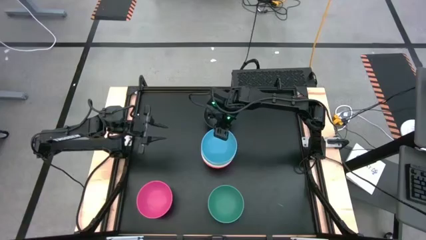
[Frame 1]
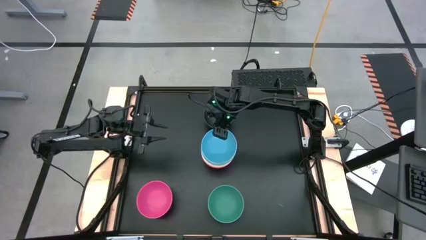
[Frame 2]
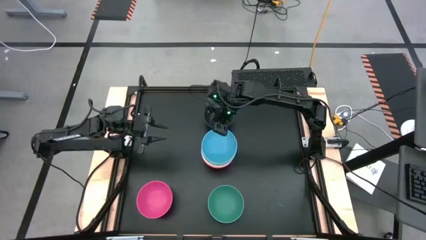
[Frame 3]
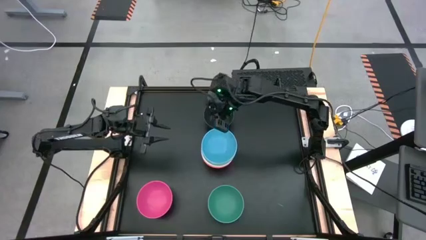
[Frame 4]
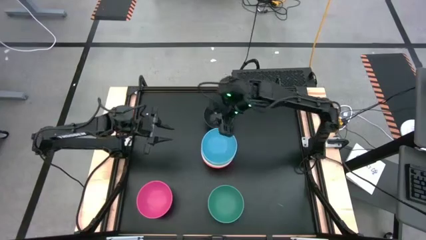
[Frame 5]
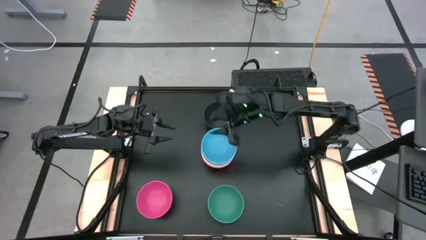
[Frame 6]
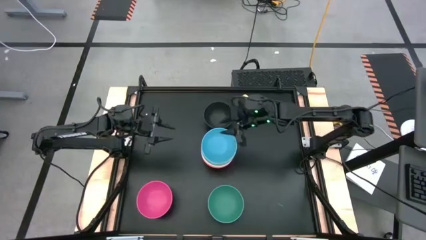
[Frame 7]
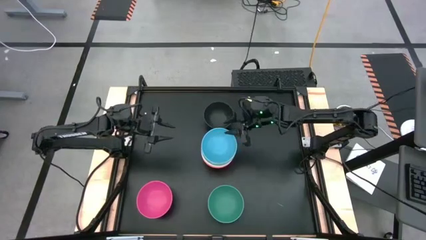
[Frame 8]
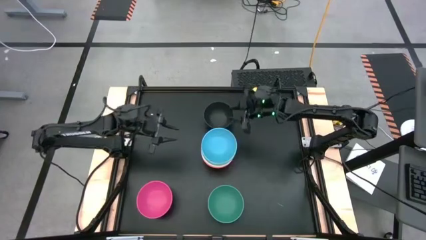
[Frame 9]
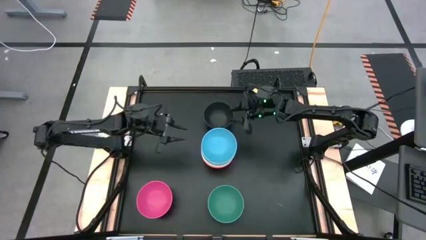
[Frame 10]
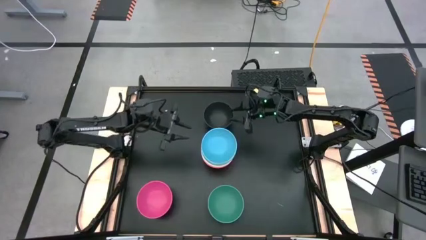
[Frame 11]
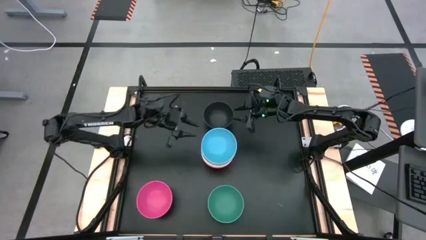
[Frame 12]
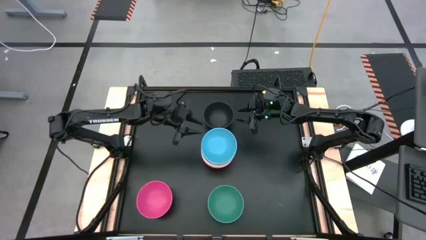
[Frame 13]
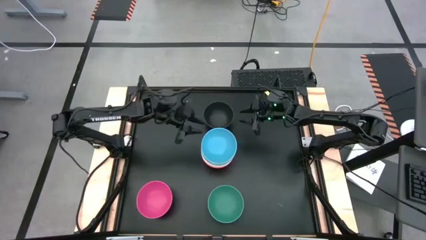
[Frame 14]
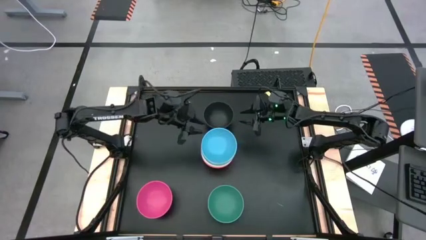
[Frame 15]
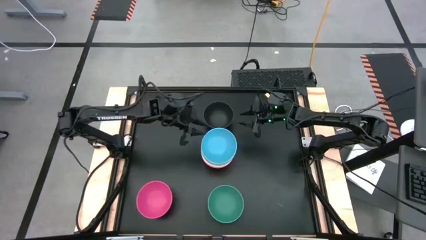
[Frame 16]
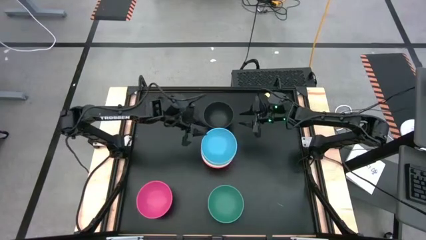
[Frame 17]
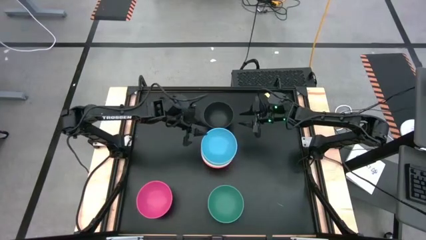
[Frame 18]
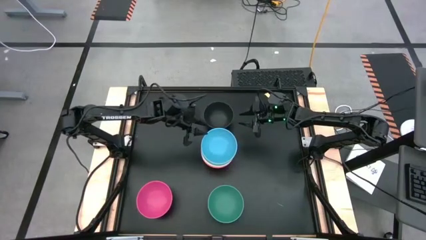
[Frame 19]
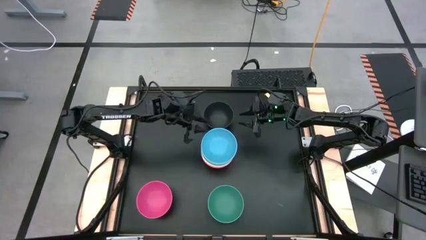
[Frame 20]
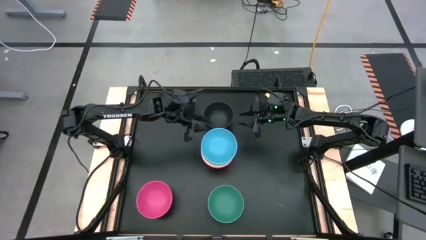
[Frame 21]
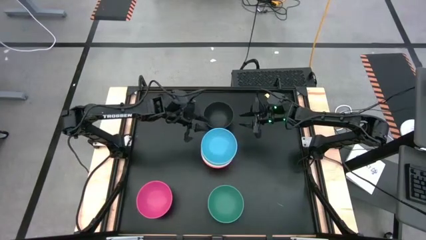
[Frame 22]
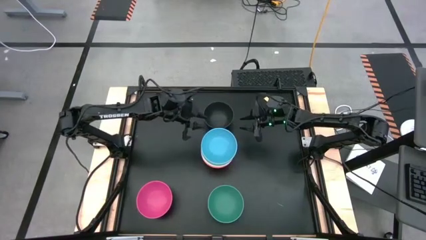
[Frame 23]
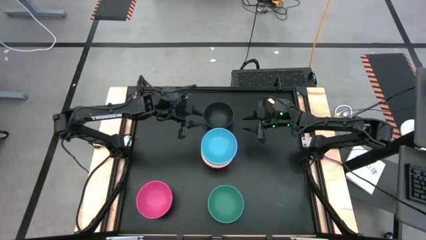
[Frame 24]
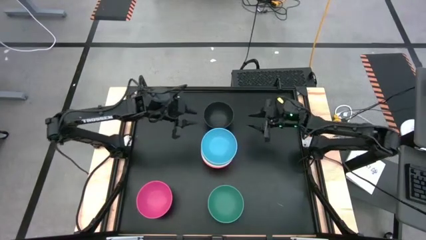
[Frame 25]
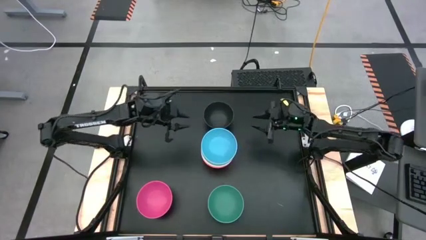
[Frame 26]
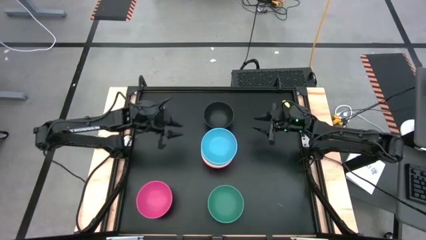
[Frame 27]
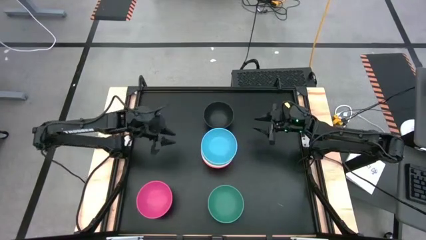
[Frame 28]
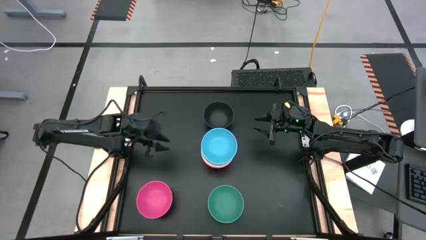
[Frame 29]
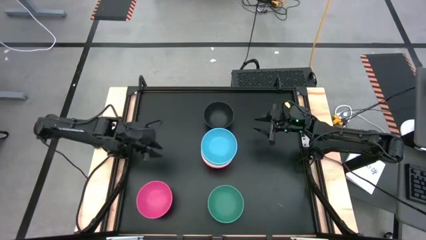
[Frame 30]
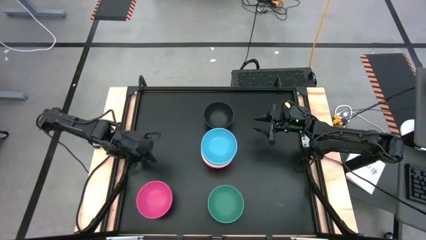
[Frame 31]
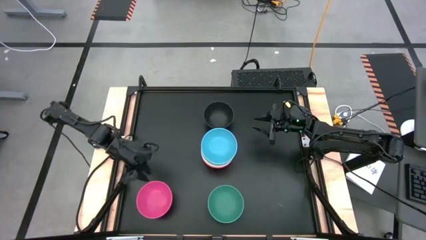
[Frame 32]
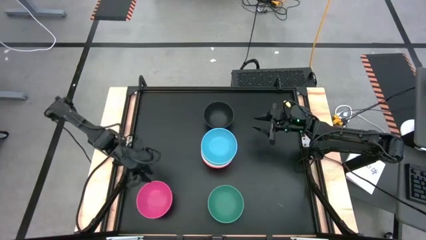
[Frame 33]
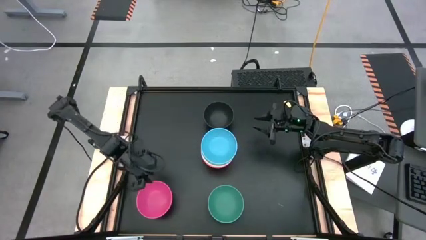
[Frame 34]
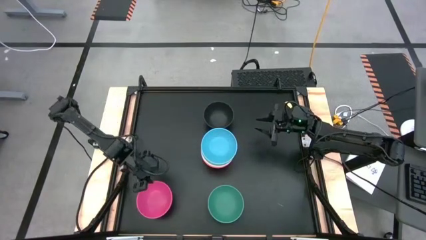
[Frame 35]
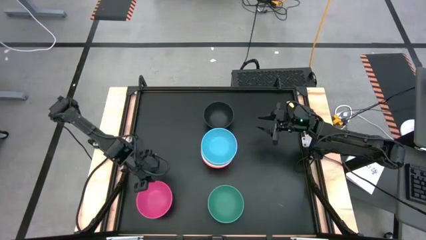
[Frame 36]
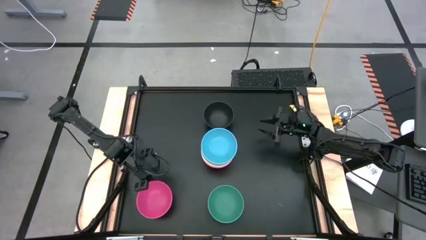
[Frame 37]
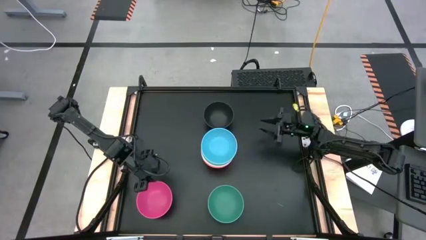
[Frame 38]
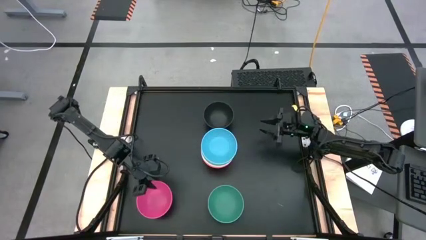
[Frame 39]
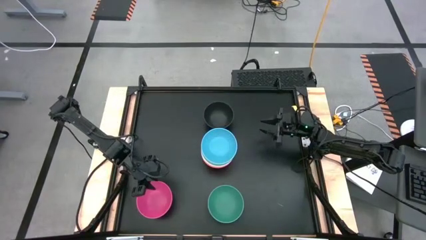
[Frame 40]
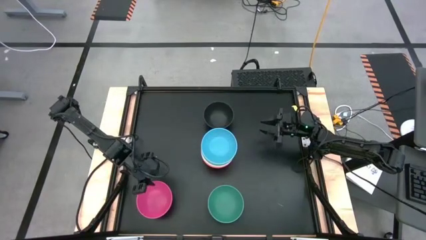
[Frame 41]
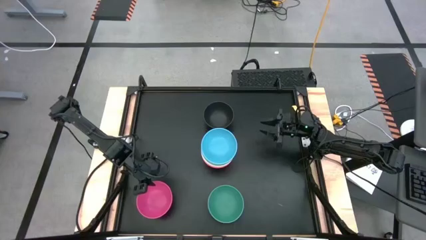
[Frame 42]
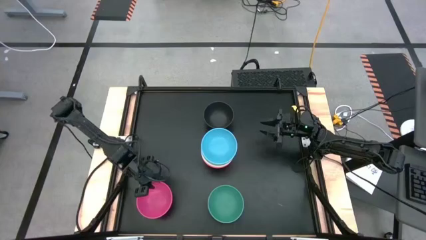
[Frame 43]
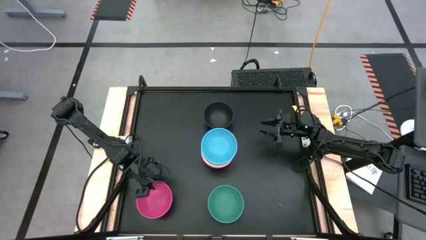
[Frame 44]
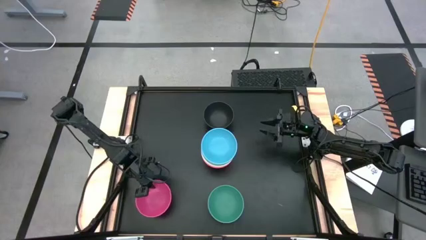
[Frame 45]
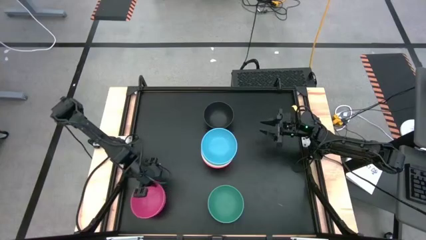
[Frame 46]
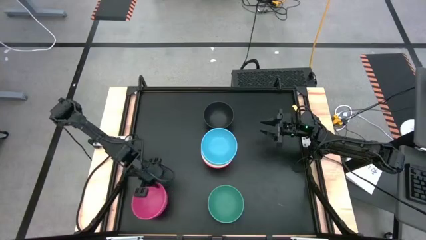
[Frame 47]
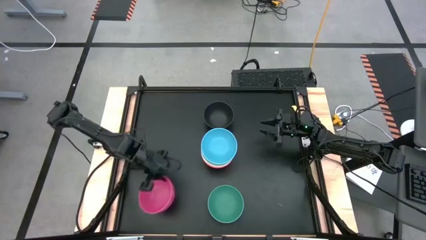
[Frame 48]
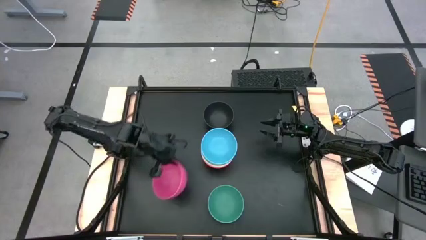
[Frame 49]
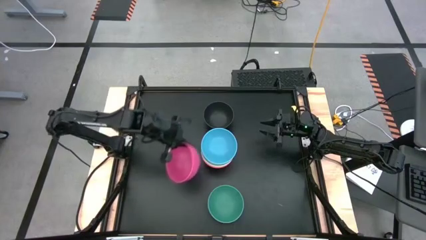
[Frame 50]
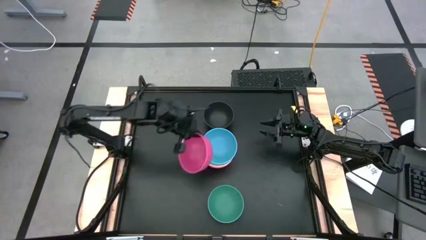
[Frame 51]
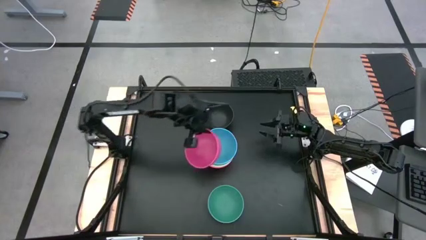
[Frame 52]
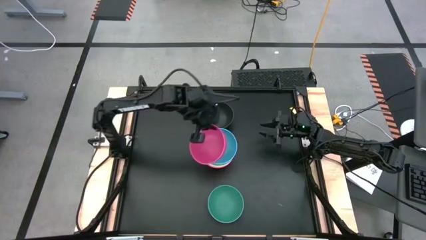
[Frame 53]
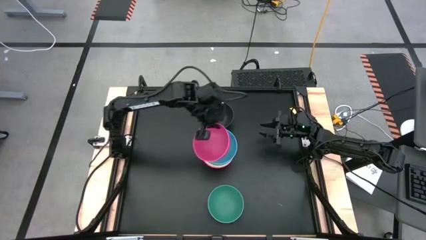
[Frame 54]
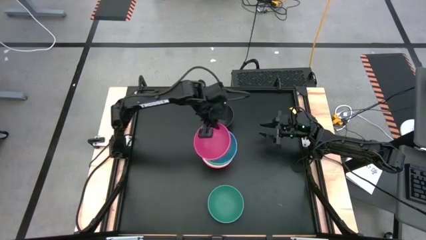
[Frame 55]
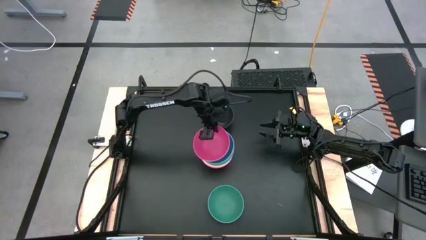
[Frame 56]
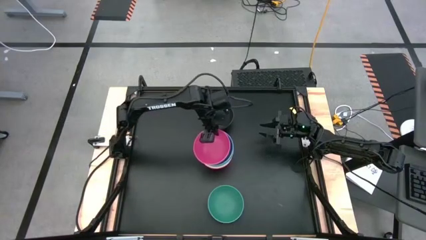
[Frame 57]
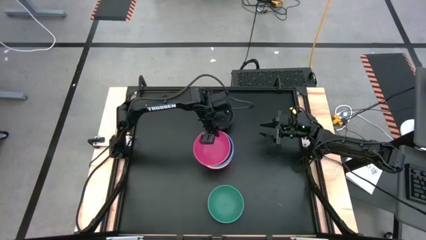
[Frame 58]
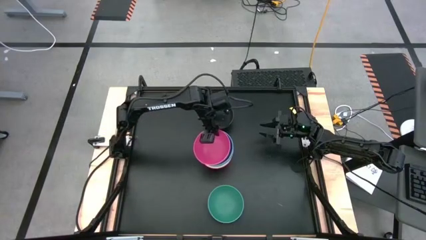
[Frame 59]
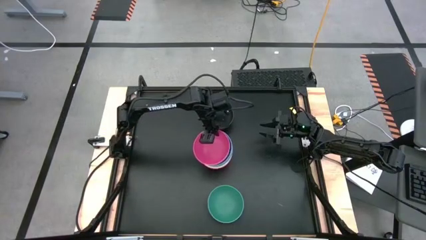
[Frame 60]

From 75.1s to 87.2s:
Task: Nest bowls inside each other
Stack the pink bowl on the blue bowl

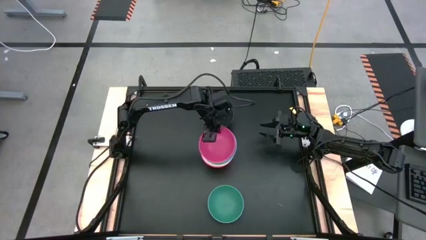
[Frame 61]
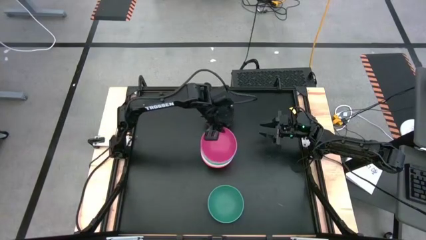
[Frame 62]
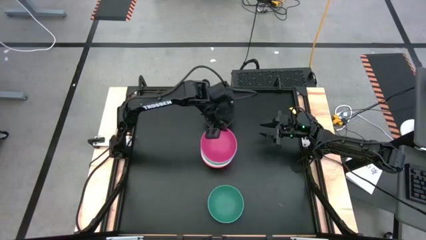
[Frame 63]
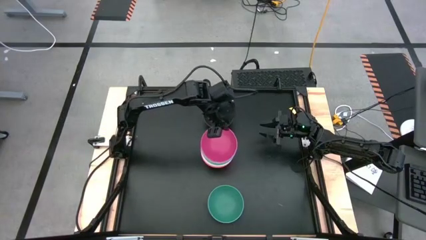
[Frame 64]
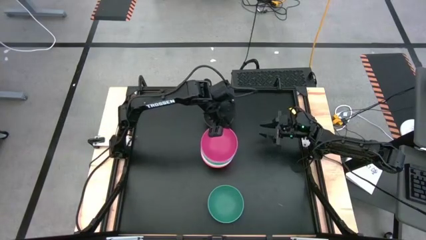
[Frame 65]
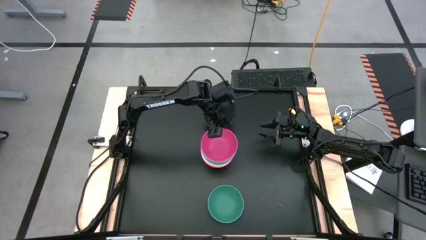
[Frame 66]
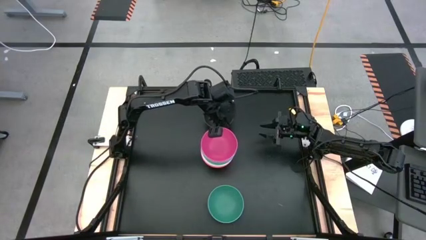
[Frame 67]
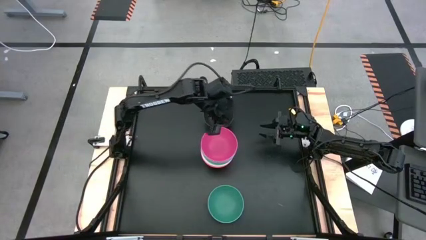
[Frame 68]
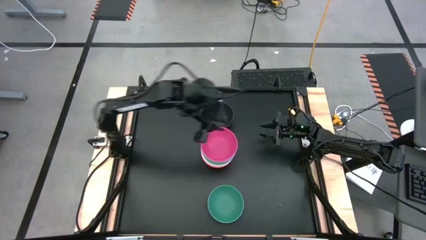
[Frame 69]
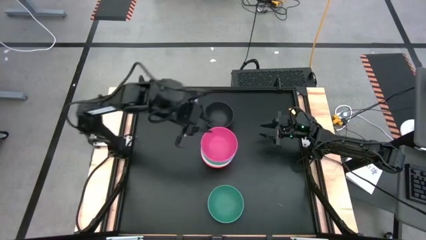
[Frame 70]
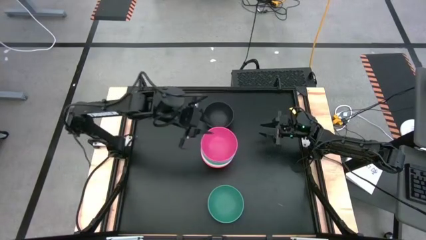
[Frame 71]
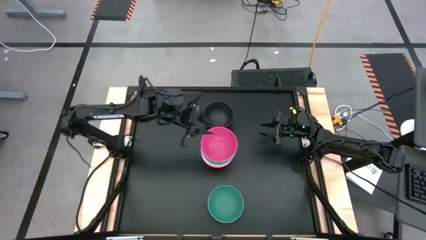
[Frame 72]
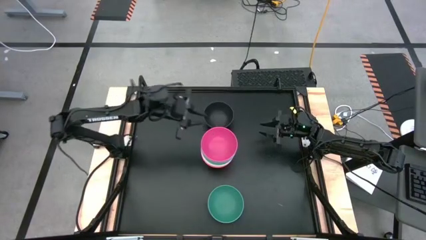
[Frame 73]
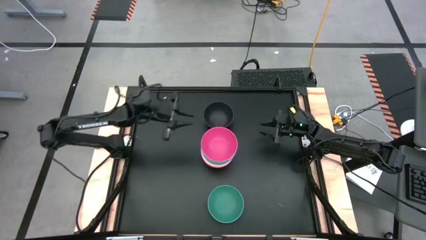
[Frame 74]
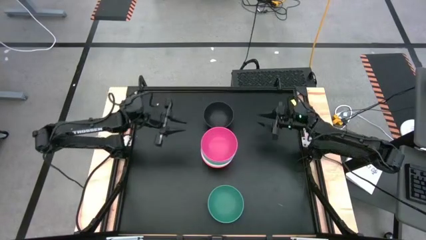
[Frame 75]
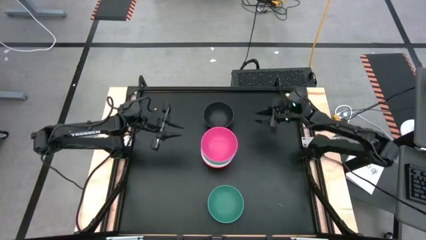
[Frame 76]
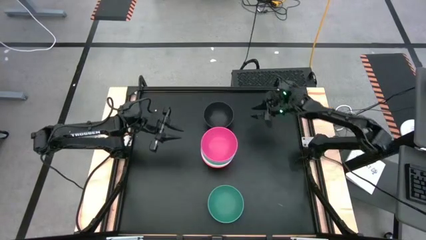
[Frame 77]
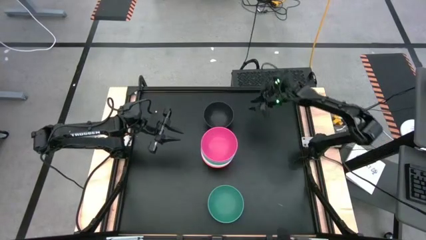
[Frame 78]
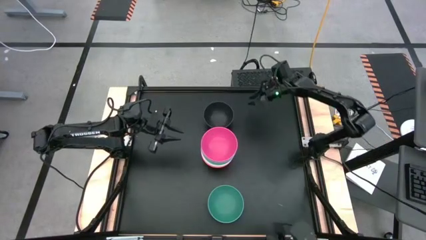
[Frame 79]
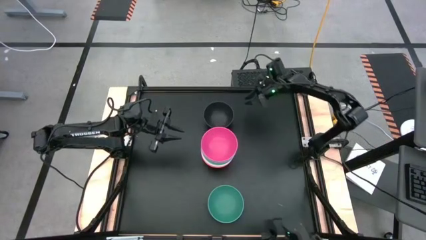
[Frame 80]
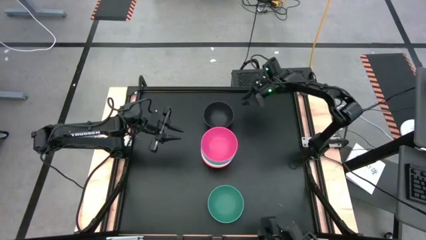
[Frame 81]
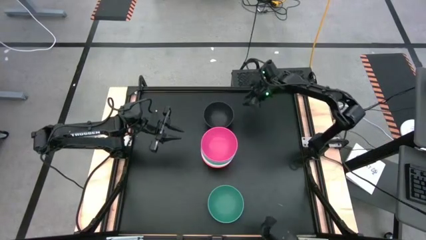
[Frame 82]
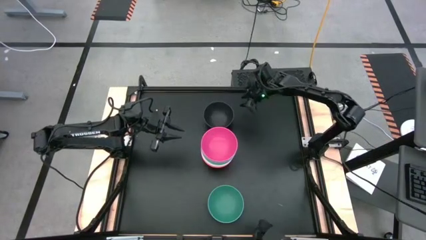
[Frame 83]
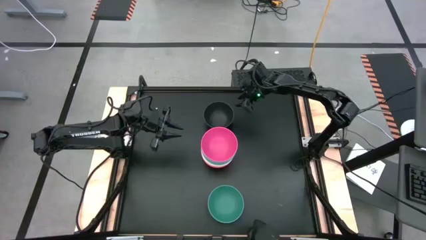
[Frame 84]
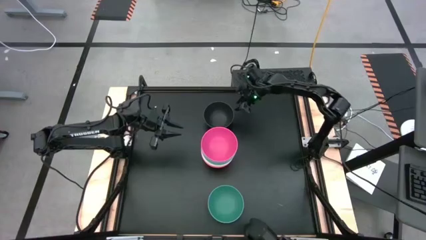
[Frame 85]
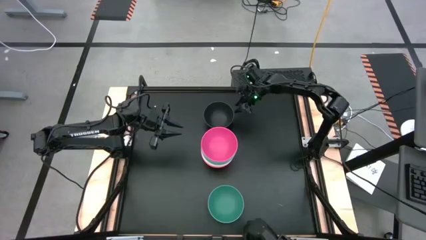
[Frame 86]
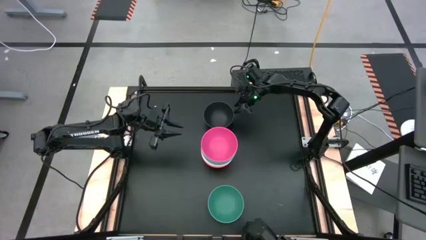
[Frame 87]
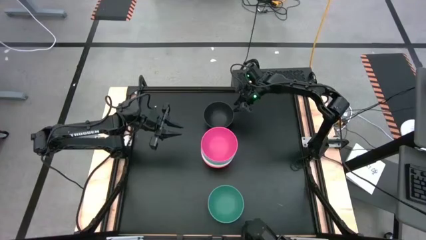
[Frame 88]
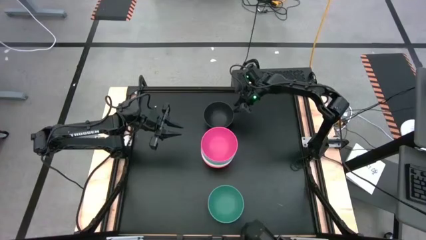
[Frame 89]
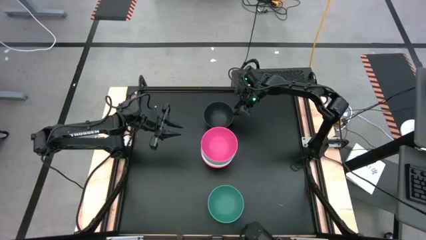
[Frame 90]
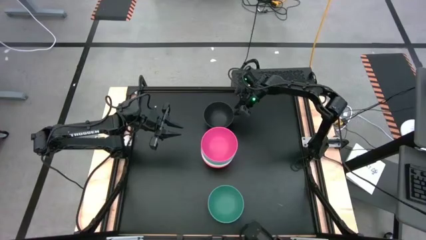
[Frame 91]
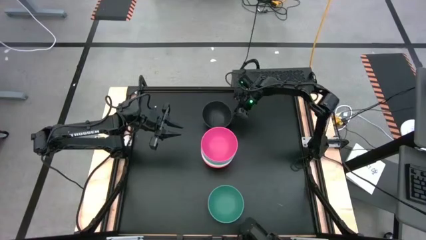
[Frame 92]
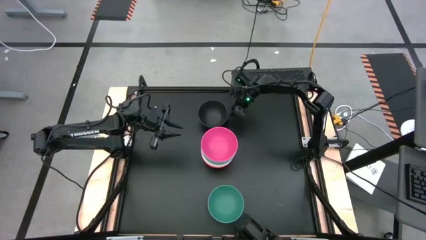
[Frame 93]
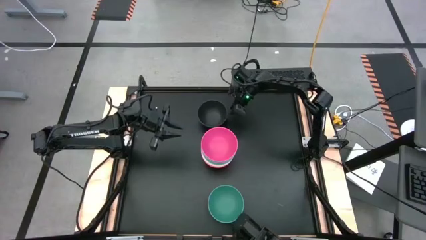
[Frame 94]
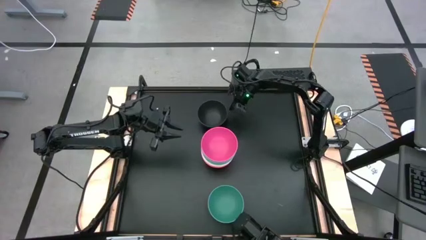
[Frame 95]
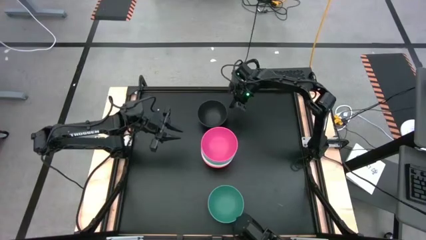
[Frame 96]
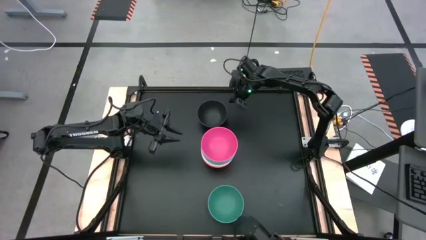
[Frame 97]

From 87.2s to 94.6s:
Stack the black bowl on the pink bowl
